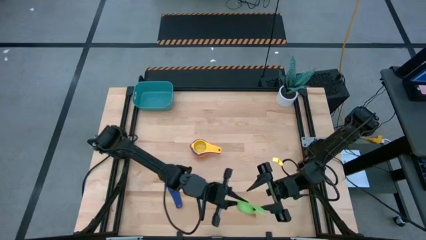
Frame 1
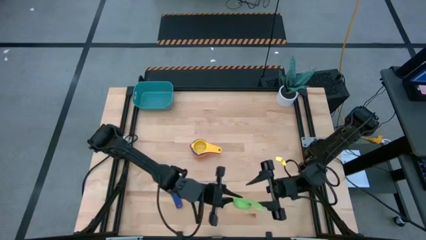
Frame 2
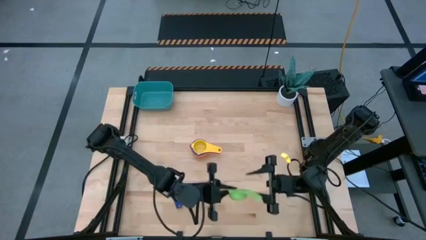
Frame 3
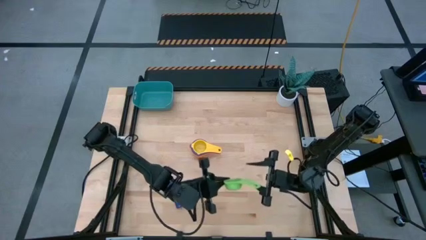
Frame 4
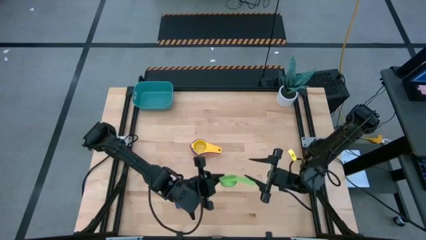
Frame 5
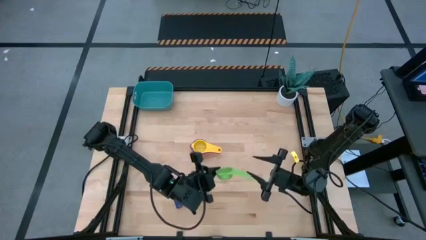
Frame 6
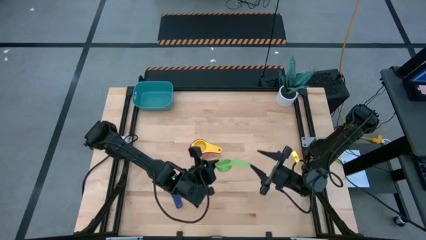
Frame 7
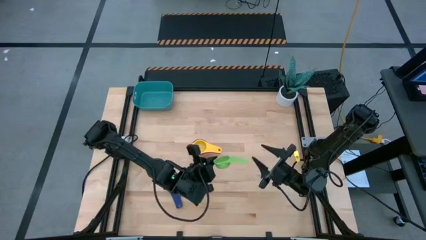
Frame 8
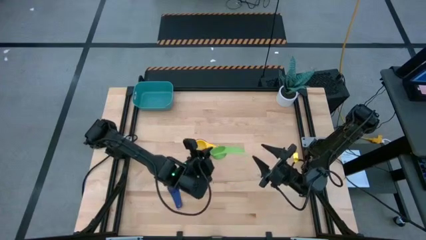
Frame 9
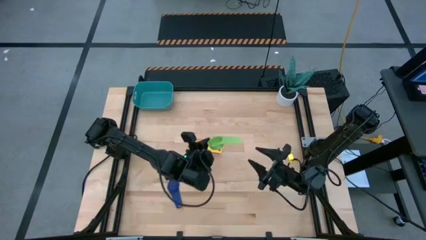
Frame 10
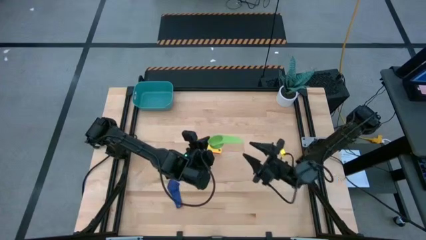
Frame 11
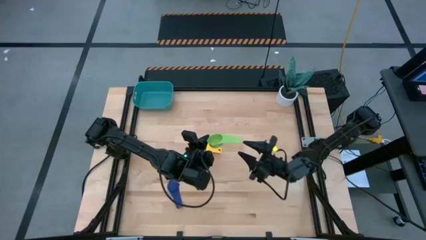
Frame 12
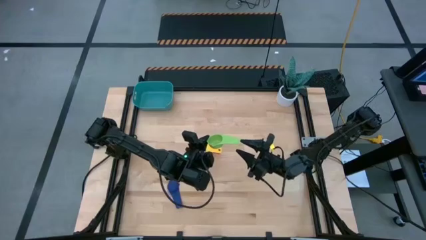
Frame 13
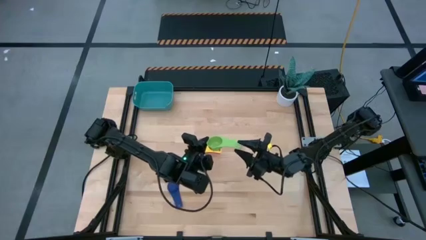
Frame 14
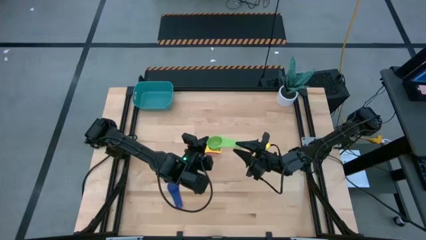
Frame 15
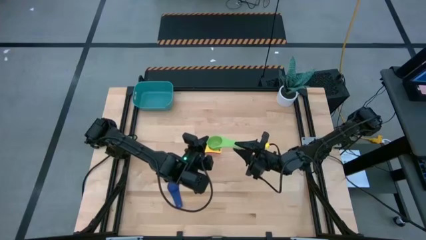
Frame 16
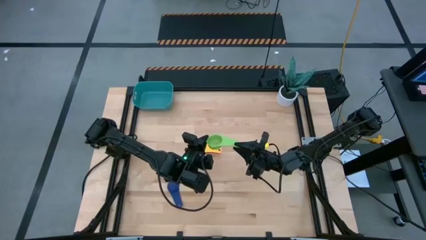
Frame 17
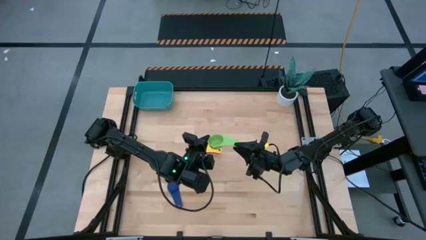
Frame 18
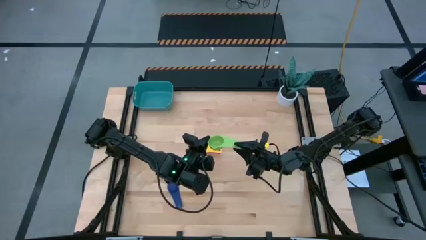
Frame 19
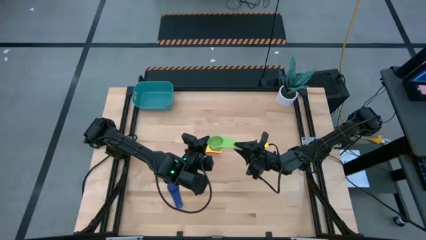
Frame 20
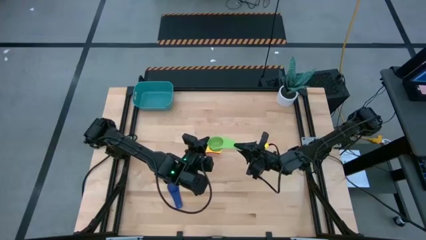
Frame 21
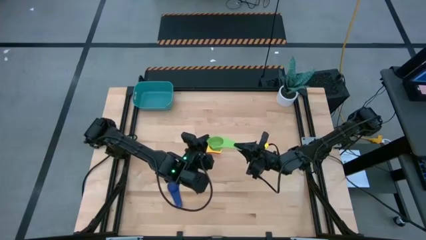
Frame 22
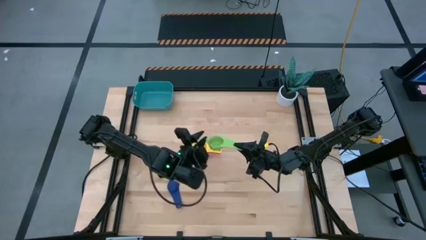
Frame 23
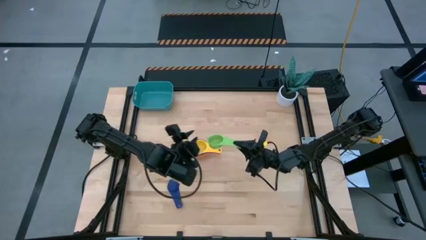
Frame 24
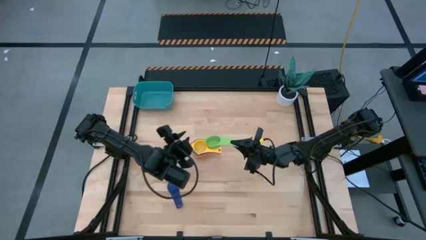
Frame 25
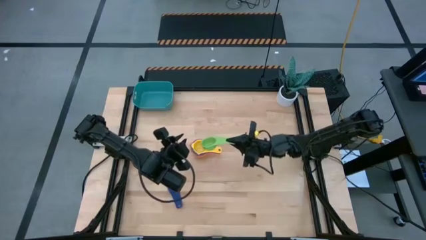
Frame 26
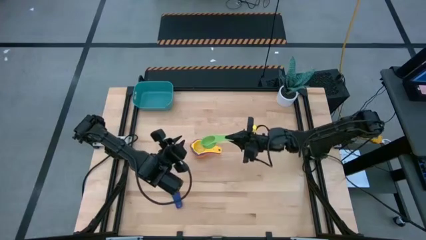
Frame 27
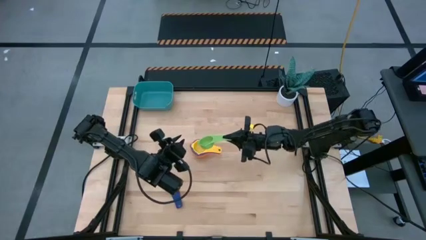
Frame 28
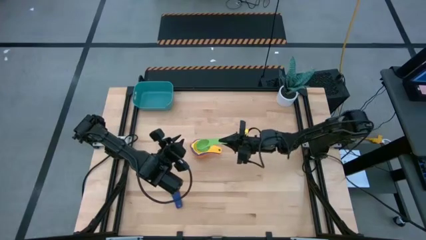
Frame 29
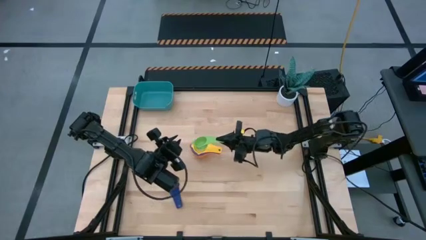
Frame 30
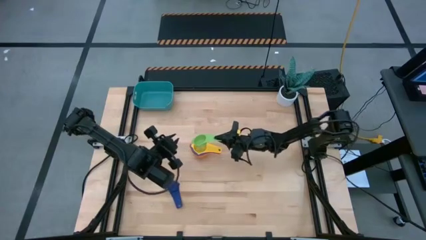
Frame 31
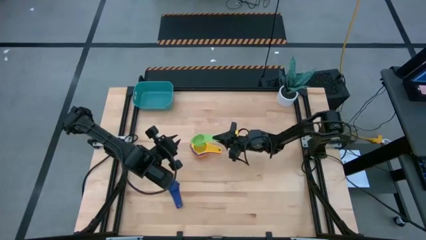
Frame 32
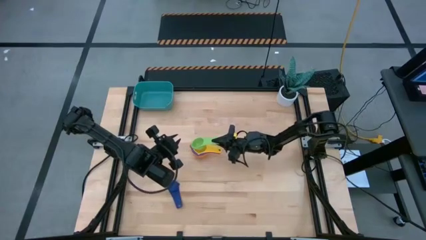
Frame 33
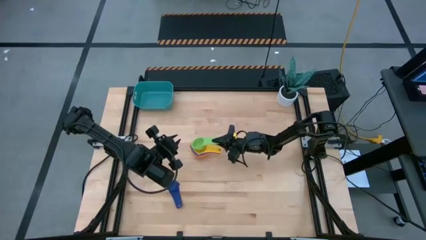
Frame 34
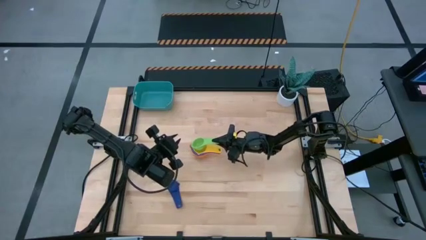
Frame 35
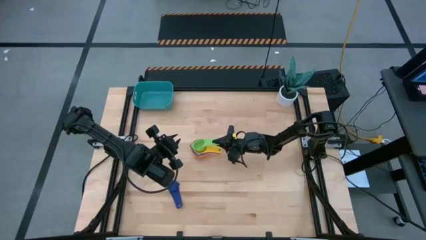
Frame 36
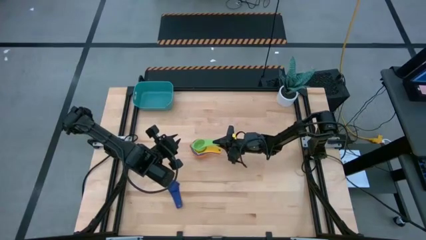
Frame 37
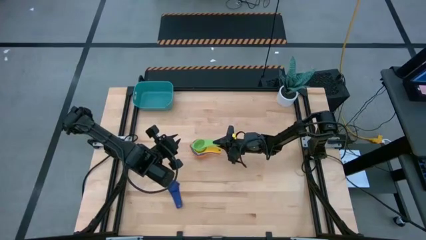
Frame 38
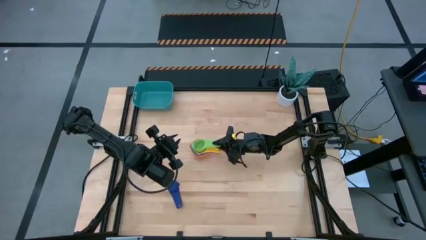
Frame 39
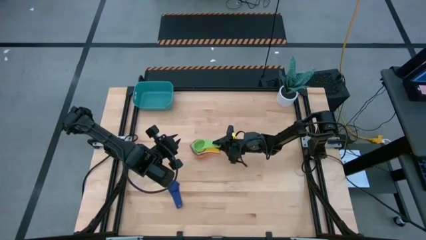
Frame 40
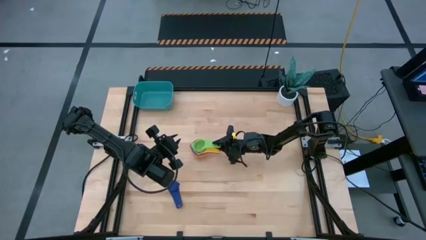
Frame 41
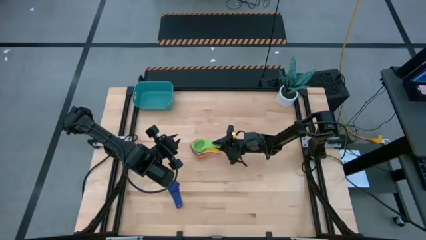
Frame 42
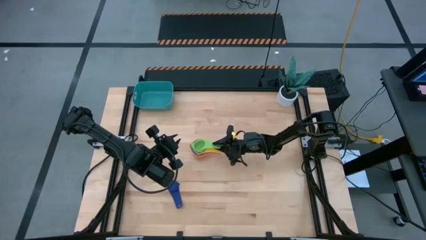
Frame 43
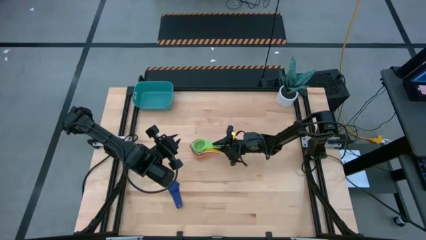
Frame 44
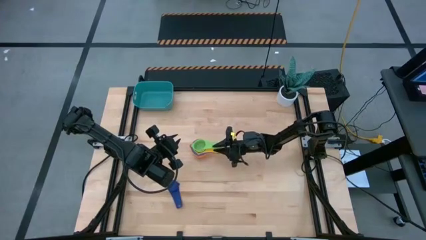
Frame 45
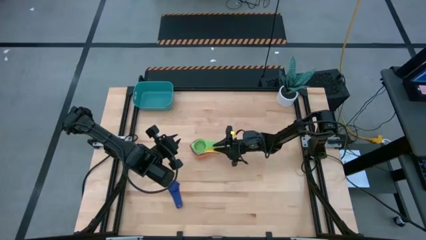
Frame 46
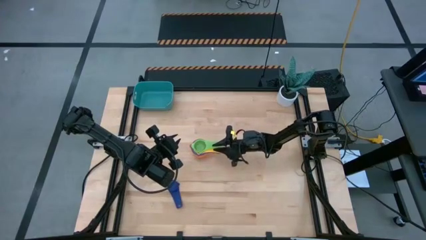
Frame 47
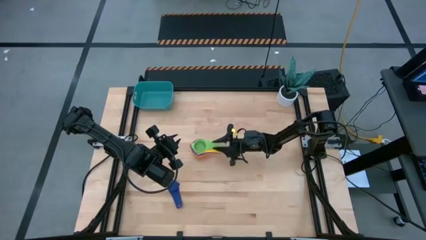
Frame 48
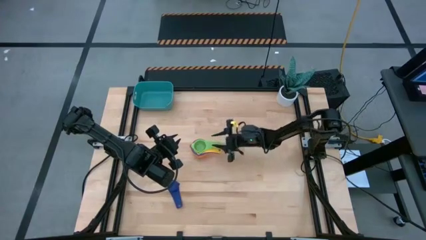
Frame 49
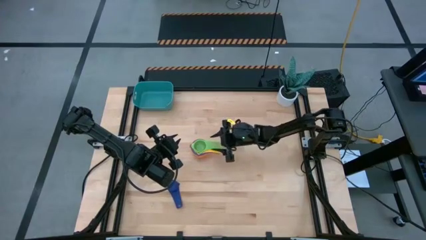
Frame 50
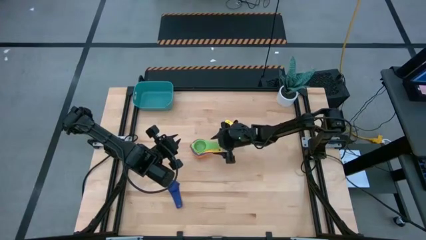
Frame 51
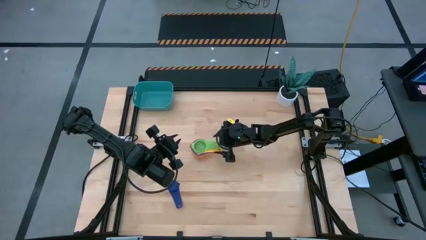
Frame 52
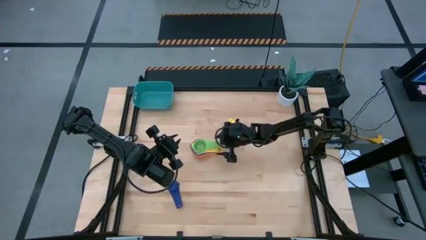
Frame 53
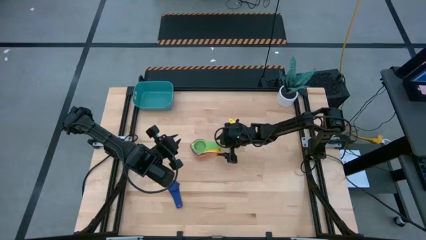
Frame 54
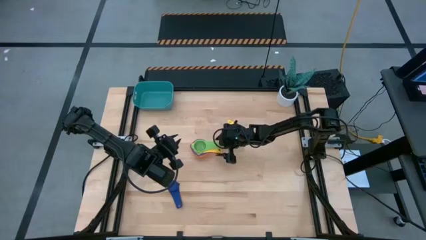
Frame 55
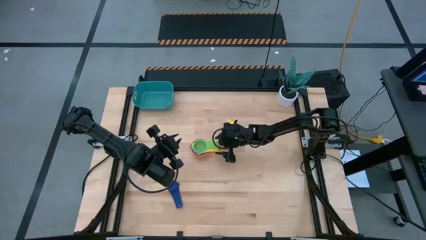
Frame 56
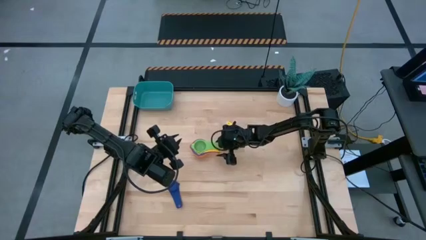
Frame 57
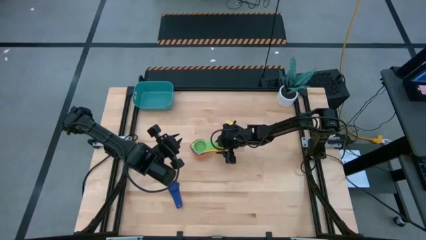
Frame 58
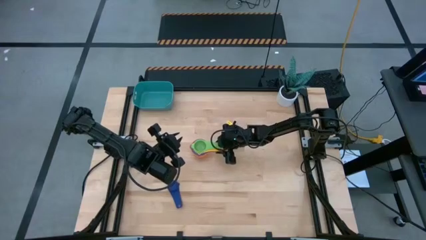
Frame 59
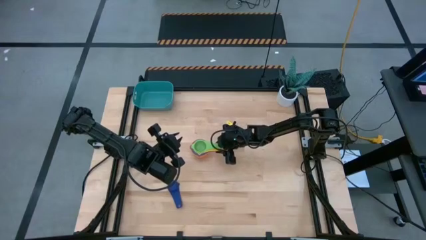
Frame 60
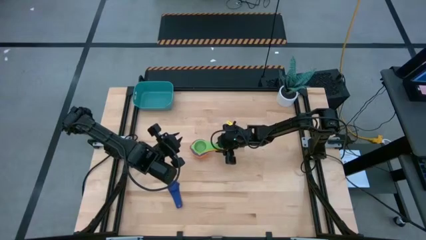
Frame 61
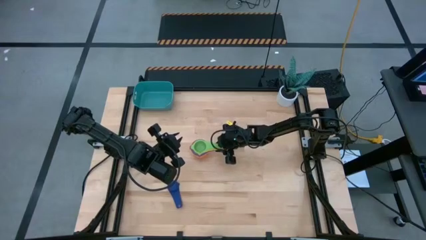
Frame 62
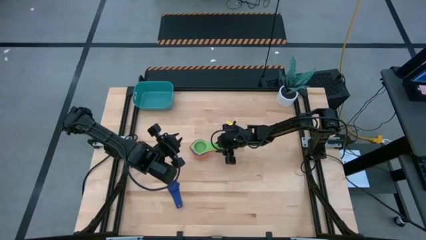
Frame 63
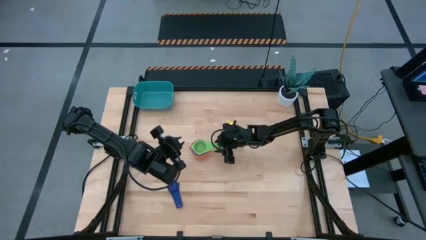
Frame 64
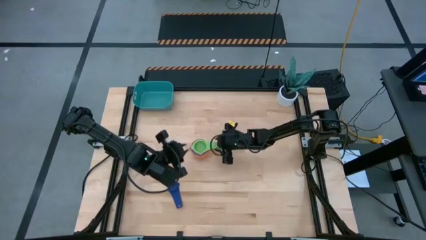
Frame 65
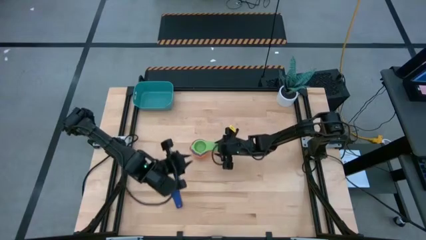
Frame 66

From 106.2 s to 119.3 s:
Task: Nest measuring cups in basket
Stack the green measuring cup on top of the yellow measuring cup

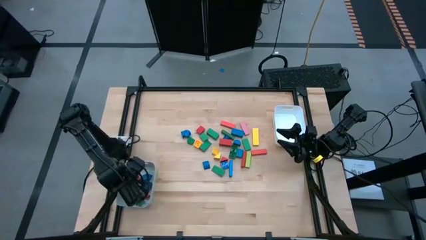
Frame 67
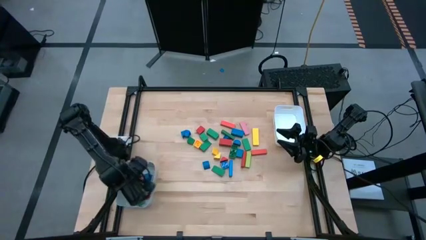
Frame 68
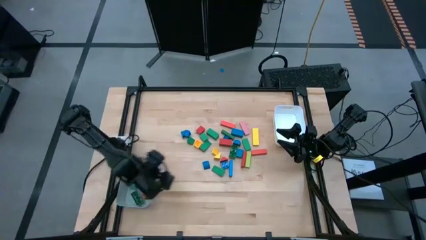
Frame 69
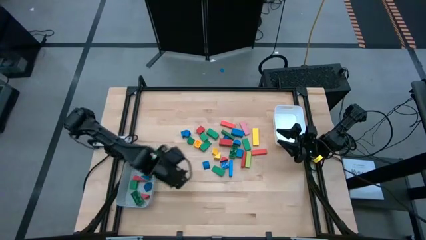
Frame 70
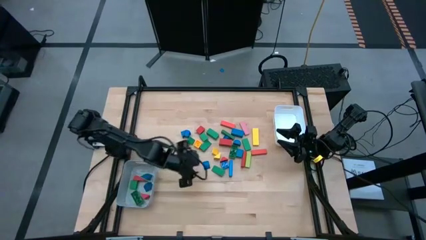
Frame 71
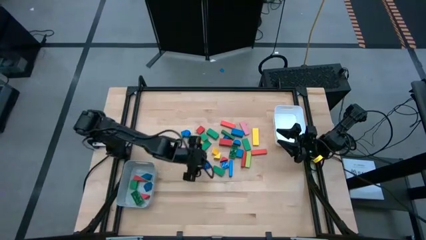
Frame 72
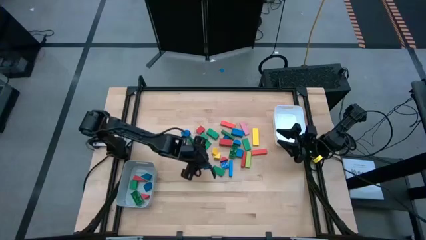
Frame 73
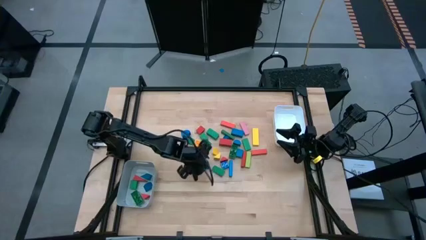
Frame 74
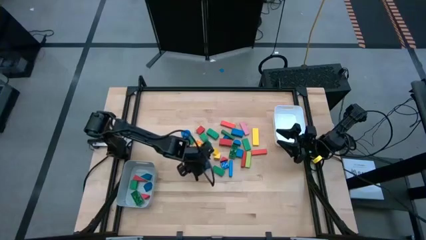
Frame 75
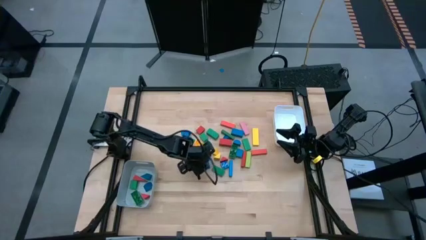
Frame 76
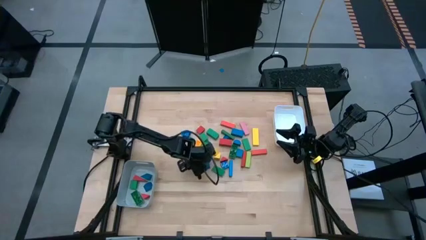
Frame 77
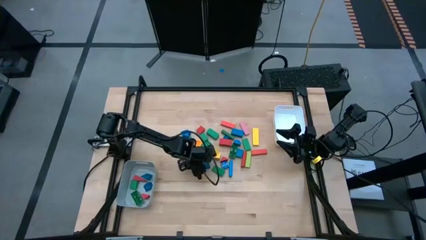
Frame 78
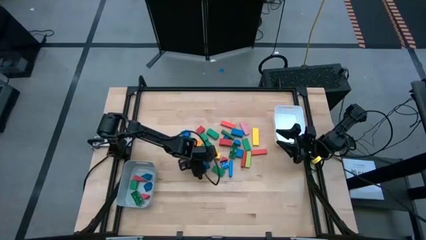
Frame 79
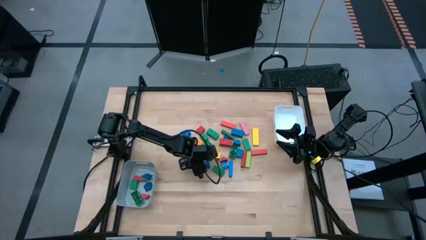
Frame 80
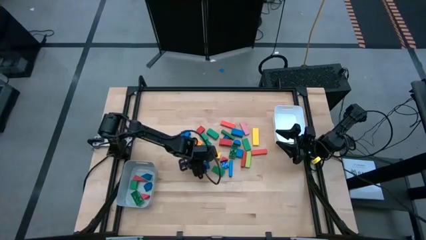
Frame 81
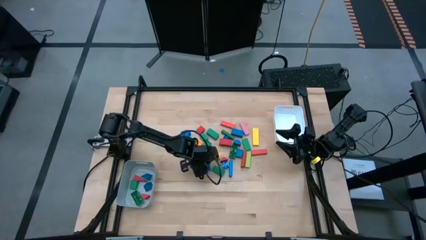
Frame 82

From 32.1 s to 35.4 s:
Task: Sort blocks by size
Put the blue half cylindrical block into the gray bin
